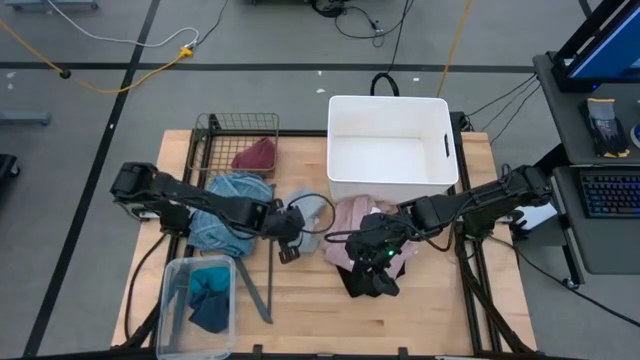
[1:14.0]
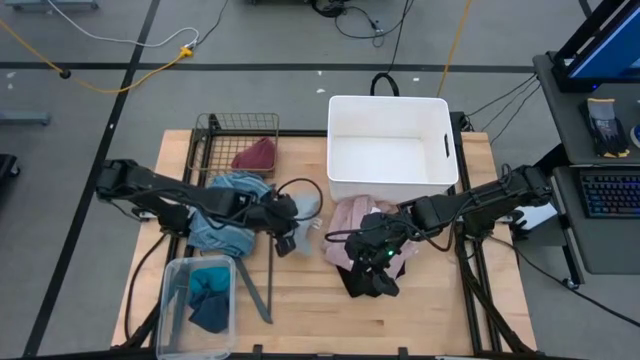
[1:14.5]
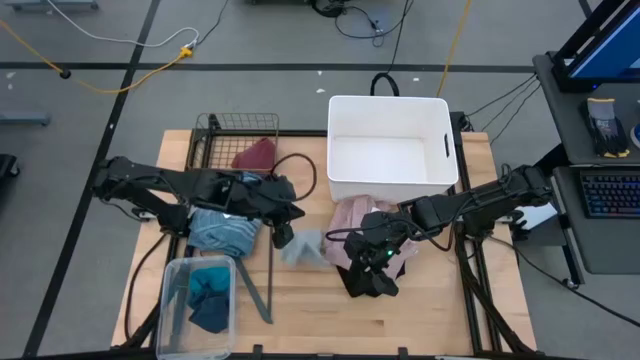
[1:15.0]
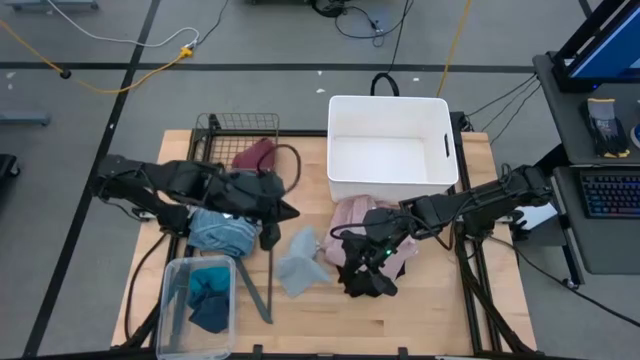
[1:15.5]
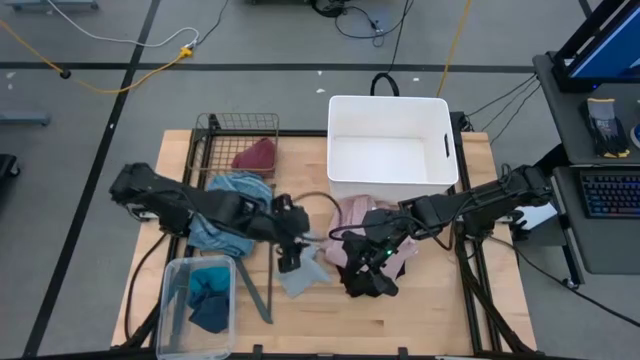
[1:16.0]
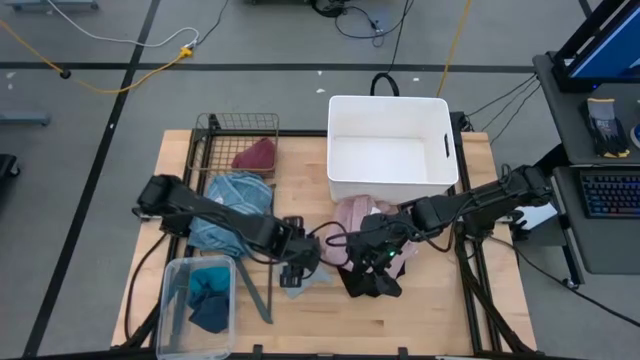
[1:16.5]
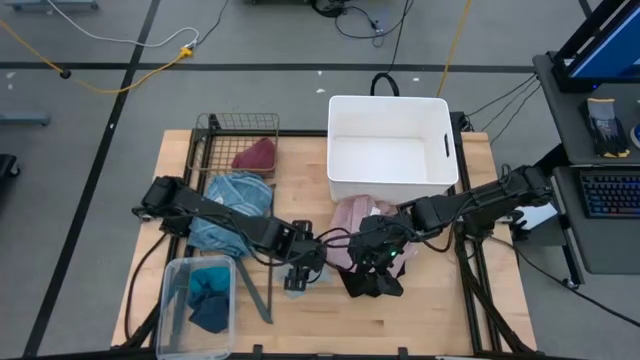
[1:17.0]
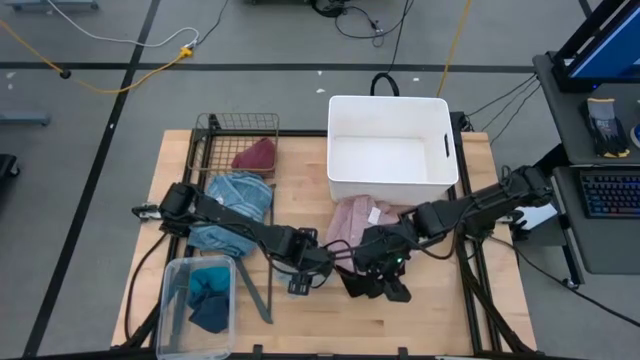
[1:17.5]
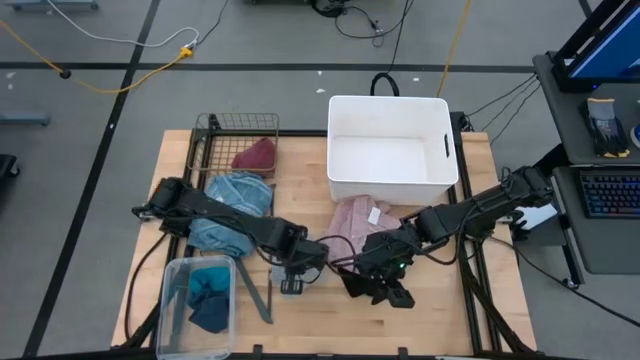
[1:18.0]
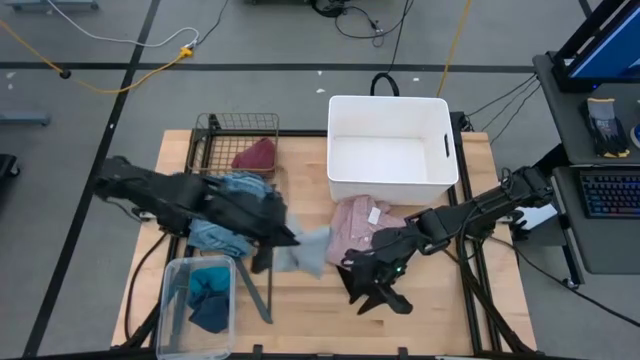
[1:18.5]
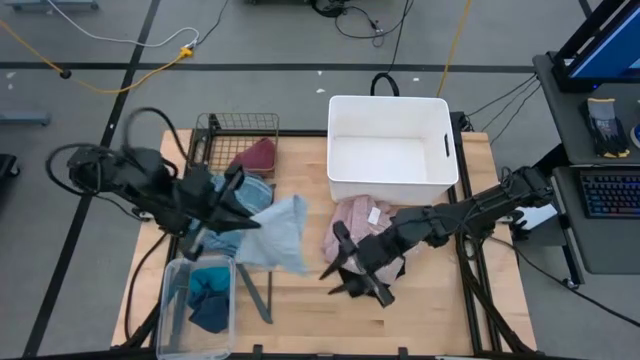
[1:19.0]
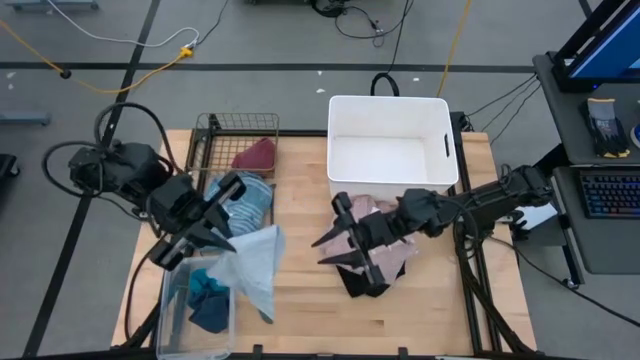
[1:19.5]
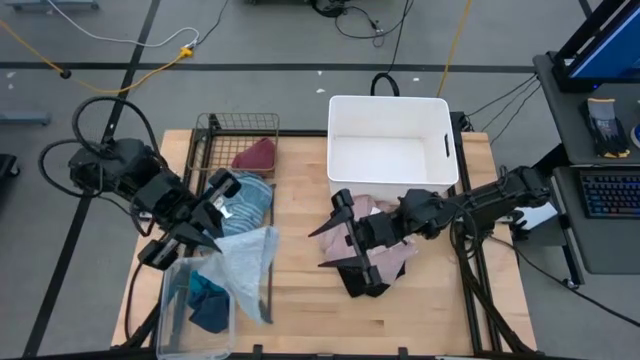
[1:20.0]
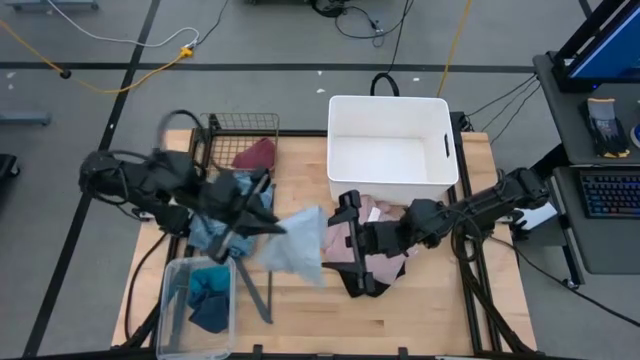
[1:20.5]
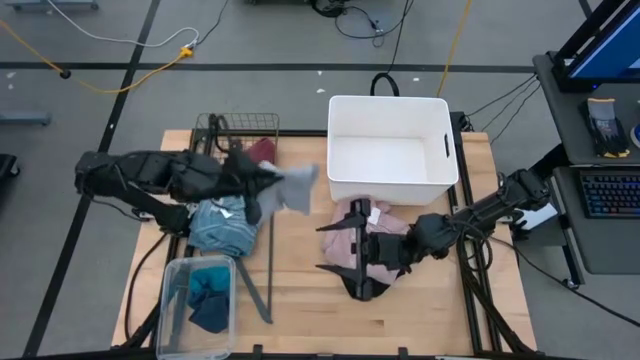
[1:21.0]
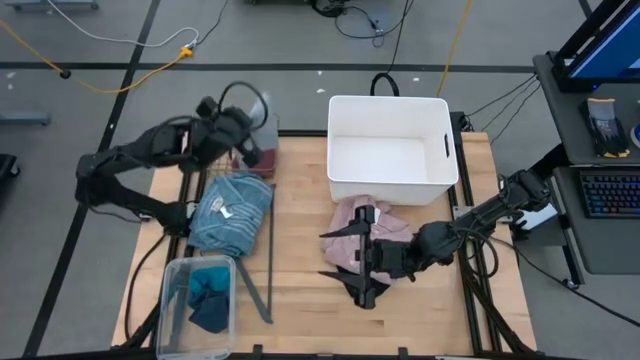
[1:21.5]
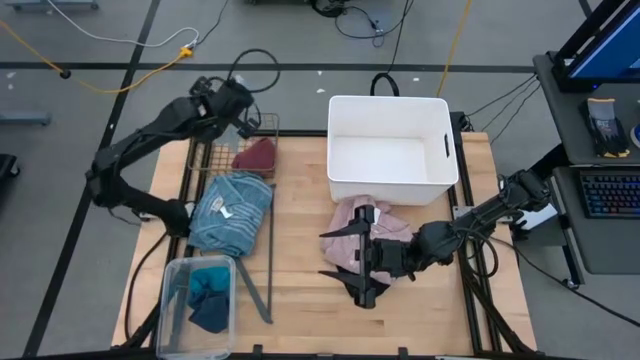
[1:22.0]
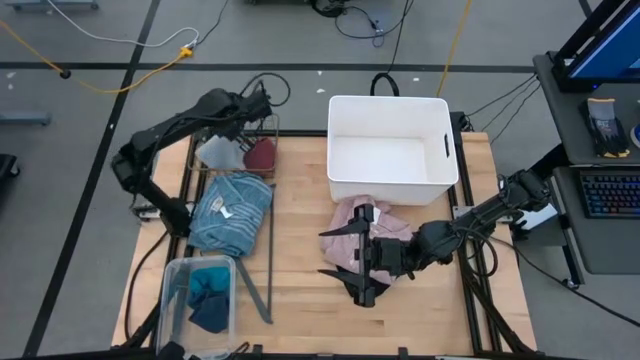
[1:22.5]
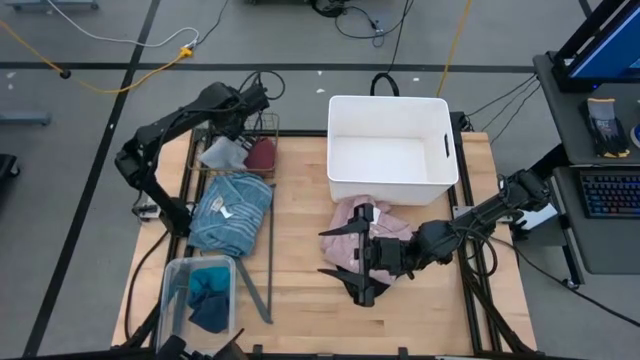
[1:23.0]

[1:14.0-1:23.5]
Task: Pick & Place Cloths
Put the gray shorts into the black wire basket

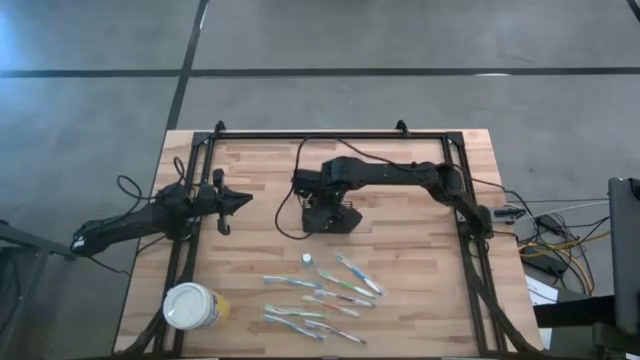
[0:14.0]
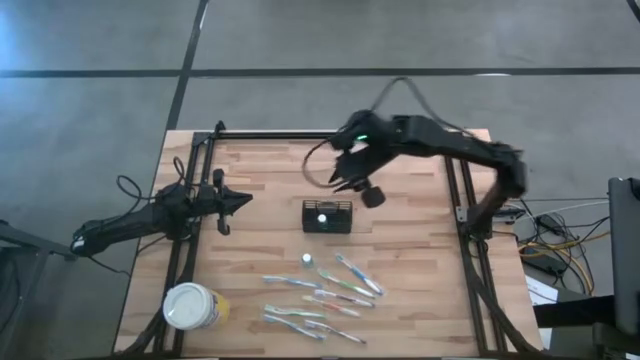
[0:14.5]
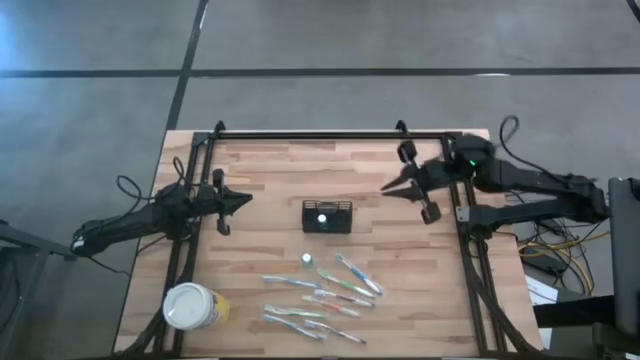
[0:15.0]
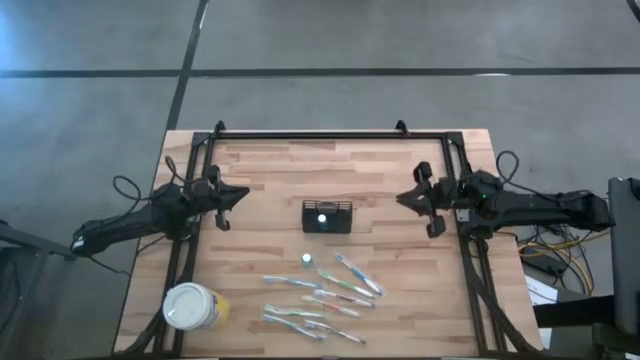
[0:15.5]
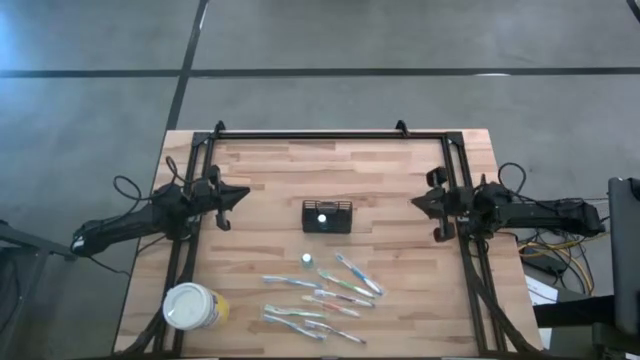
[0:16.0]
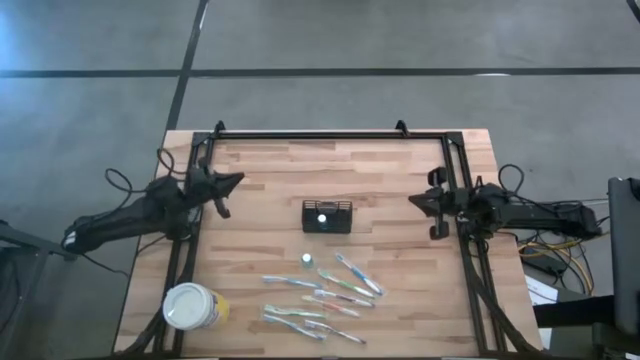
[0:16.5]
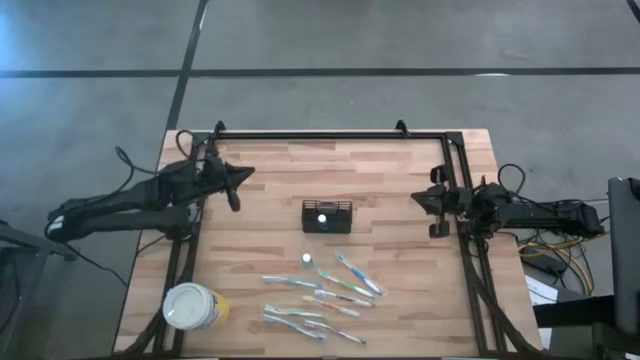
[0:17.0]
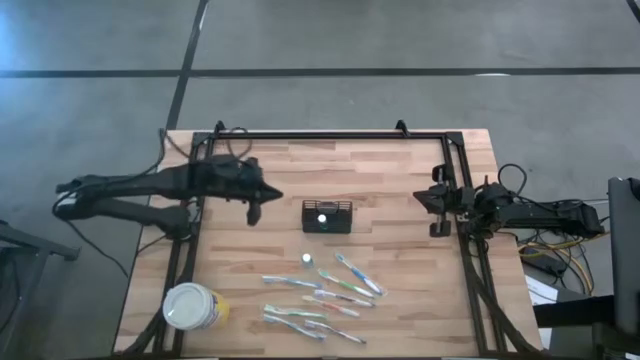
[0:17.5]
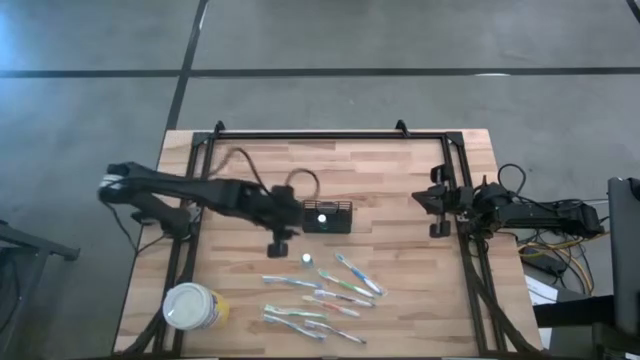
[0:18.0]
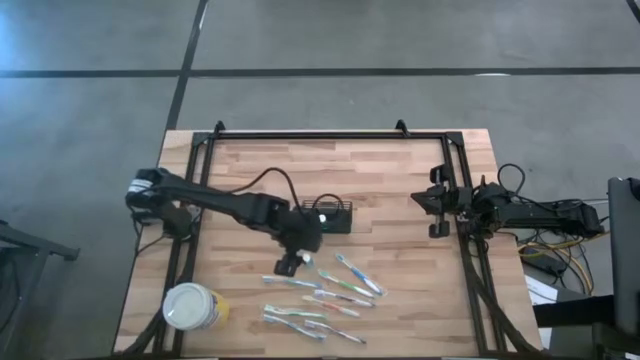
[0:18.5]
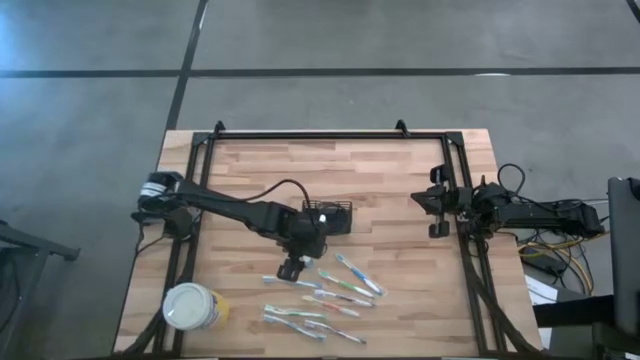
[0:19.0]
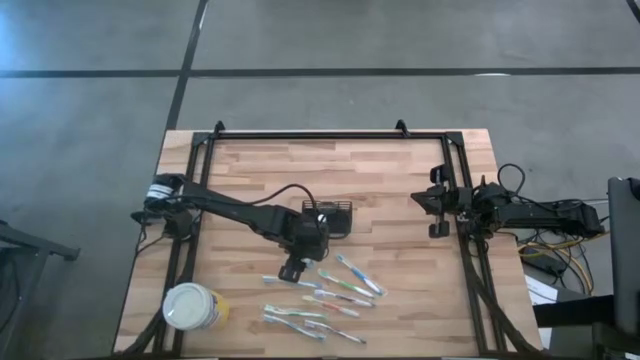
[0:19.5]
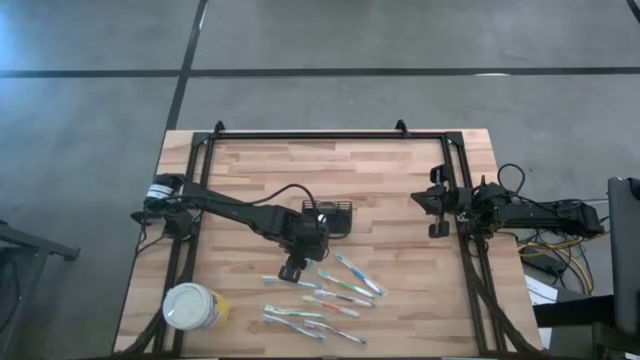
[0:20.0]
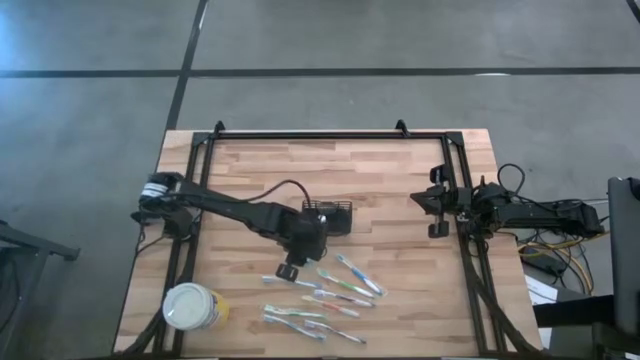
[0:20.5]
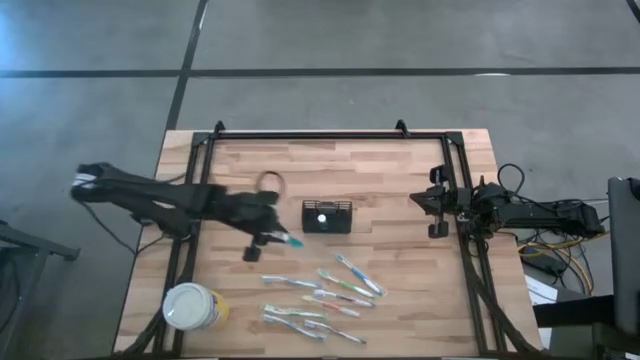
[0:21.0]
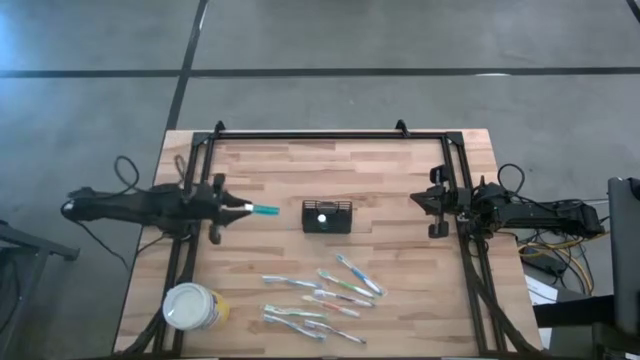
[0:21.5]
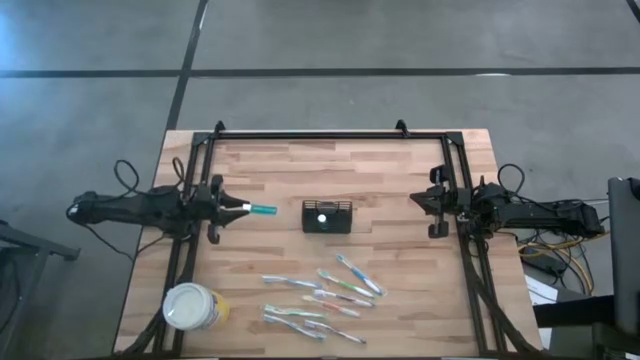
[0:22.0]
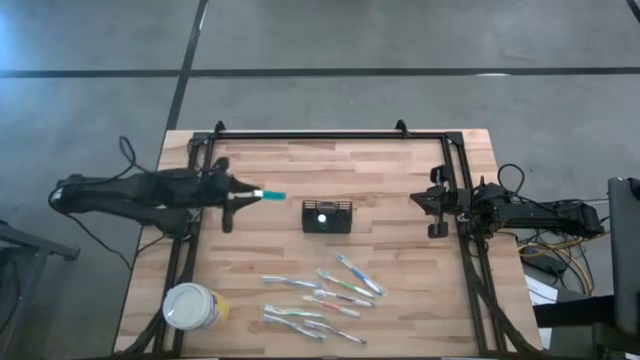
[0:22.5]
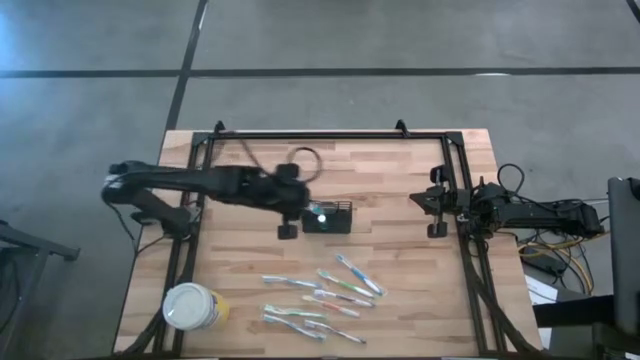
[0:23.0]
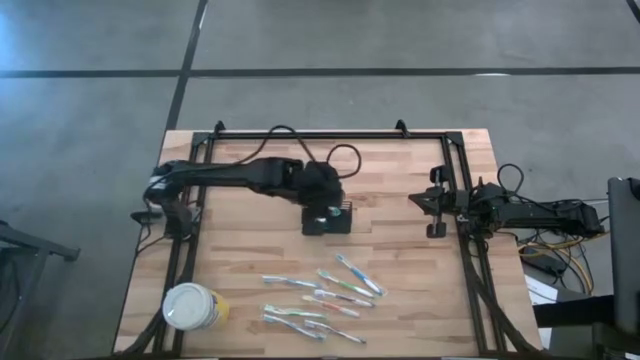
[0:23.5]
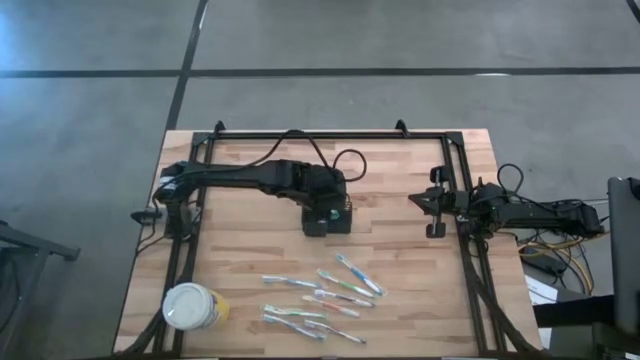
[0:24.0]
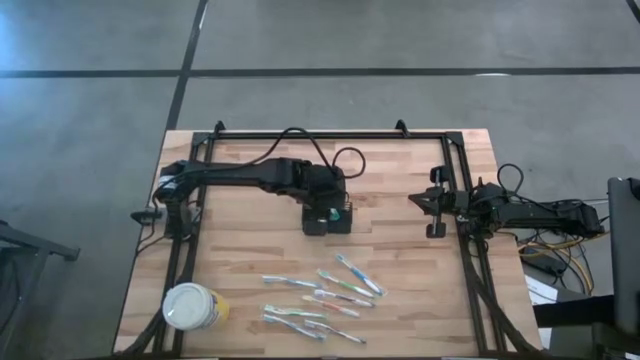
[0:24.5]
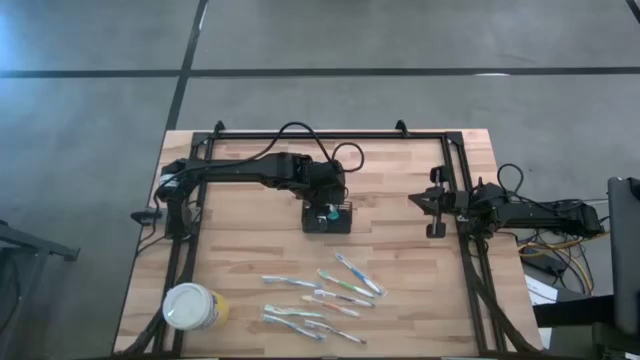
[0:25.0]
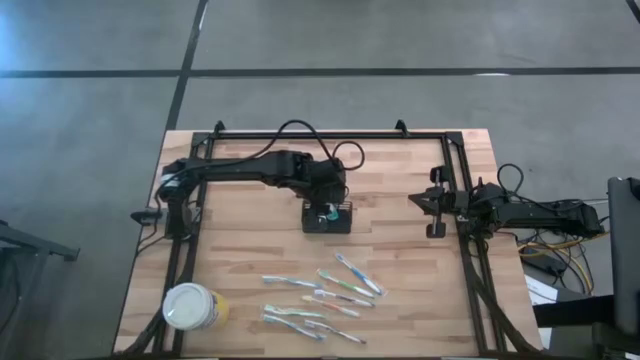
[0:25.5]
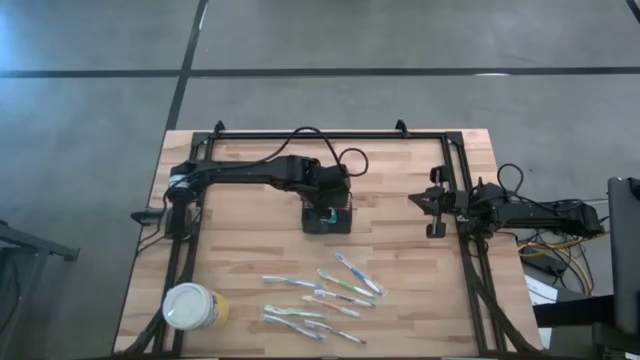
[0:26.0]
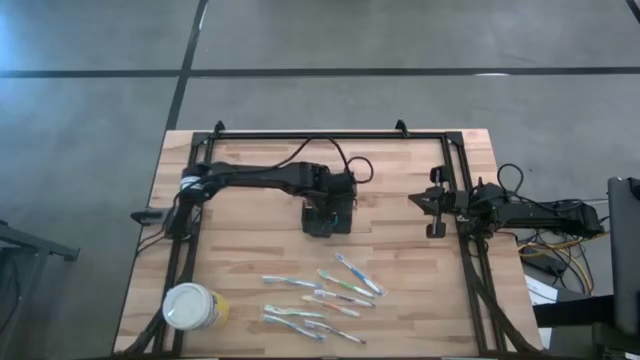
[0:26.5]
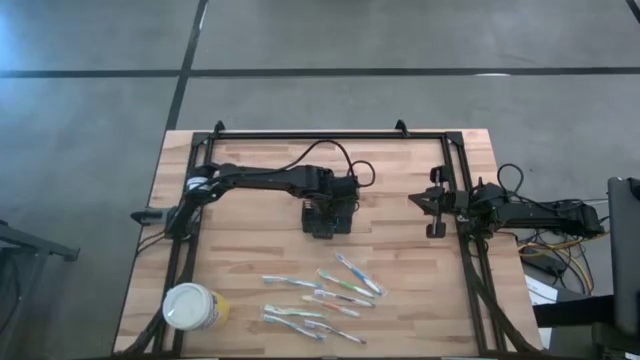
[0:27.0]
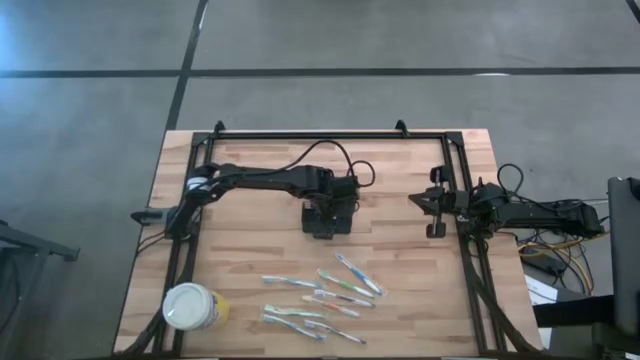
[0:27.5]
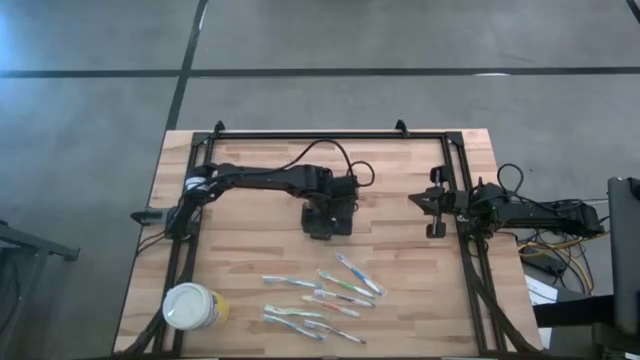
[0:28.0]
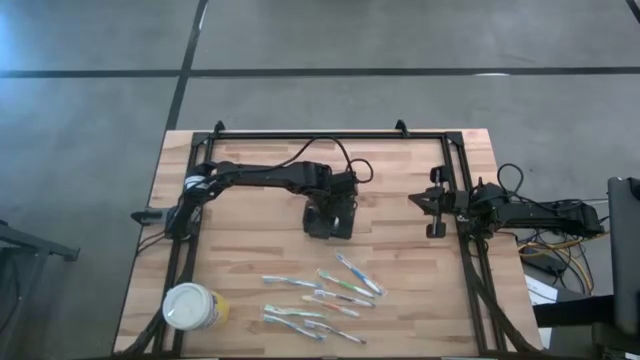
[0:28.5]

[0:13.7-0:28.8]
Task: Pick & Place toothbrushing station
Put the mouthwash into the wire organizer
